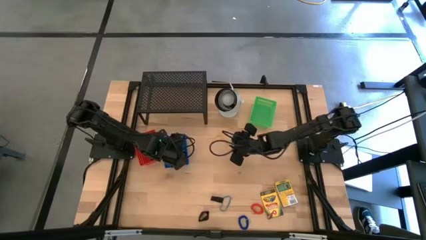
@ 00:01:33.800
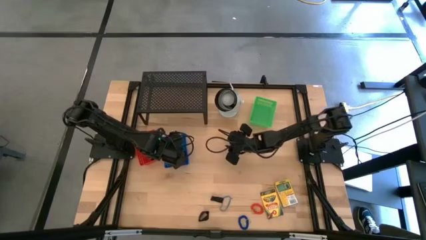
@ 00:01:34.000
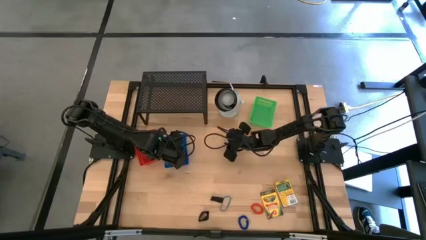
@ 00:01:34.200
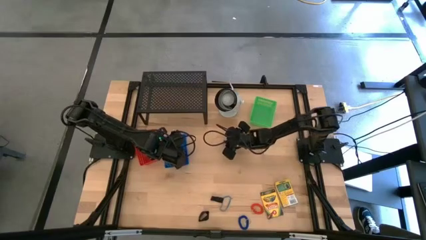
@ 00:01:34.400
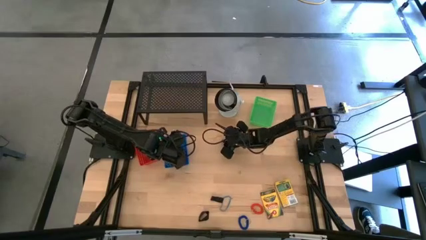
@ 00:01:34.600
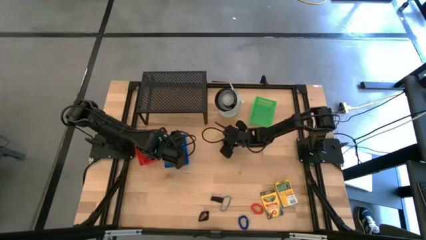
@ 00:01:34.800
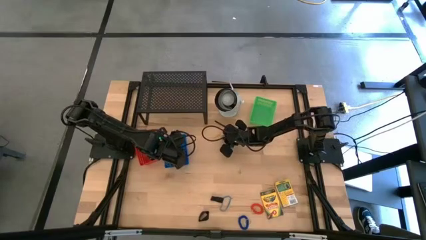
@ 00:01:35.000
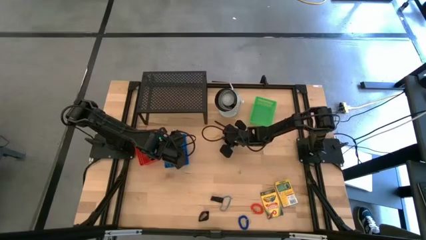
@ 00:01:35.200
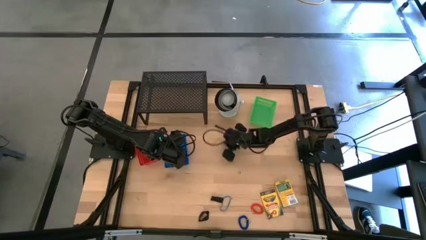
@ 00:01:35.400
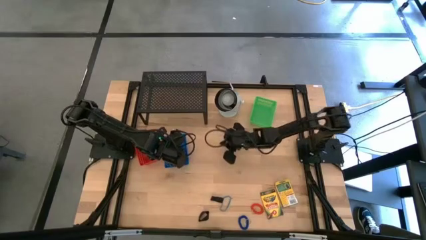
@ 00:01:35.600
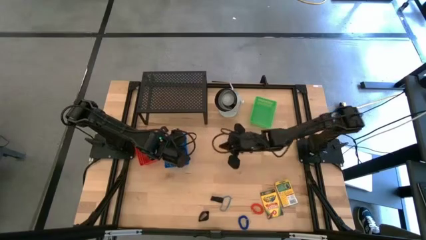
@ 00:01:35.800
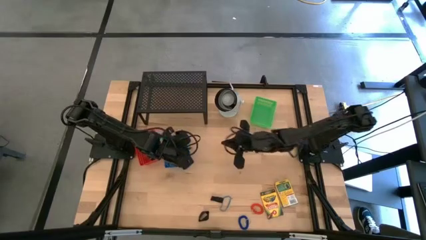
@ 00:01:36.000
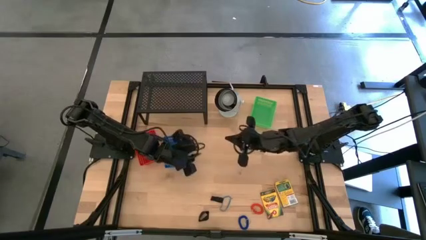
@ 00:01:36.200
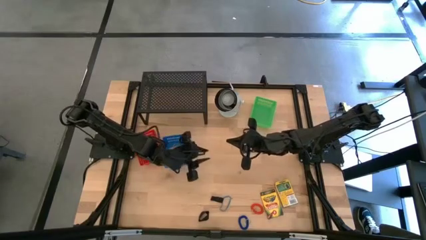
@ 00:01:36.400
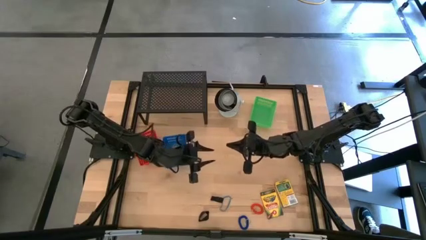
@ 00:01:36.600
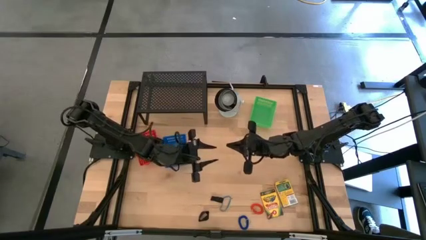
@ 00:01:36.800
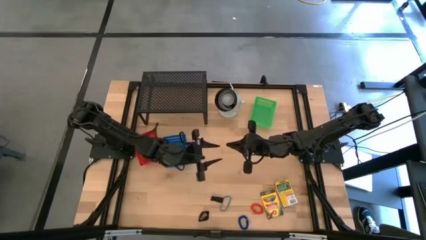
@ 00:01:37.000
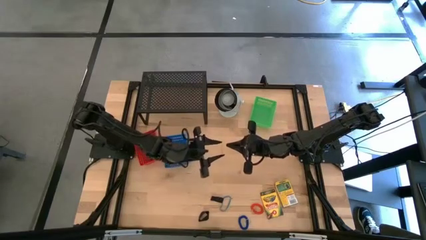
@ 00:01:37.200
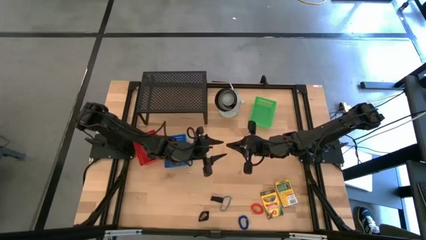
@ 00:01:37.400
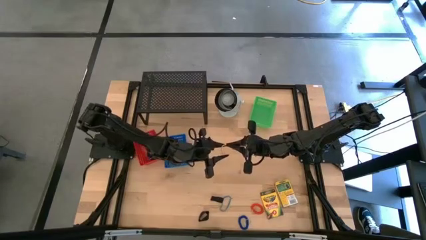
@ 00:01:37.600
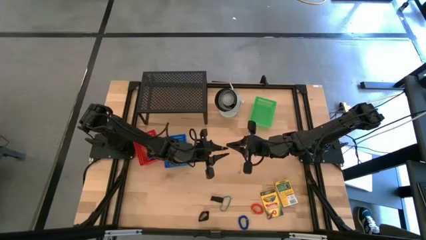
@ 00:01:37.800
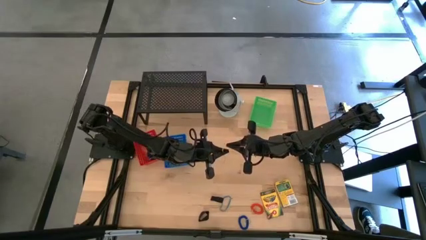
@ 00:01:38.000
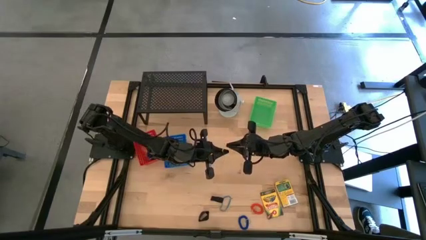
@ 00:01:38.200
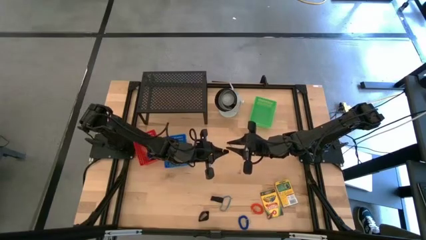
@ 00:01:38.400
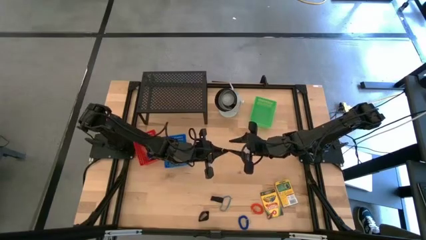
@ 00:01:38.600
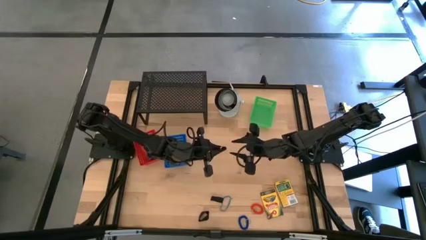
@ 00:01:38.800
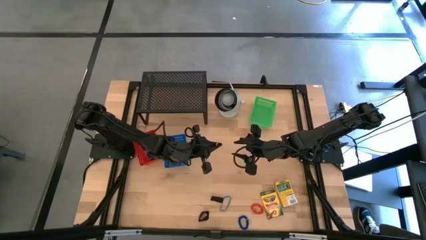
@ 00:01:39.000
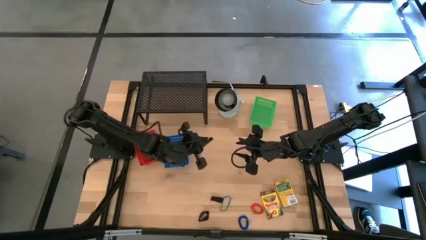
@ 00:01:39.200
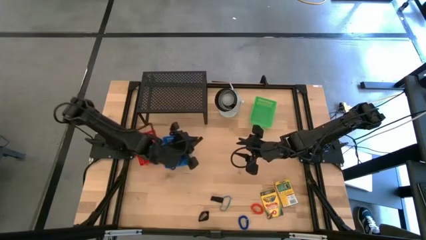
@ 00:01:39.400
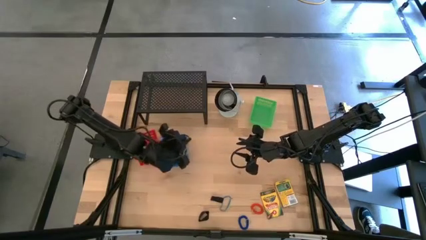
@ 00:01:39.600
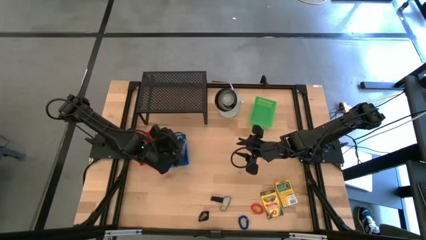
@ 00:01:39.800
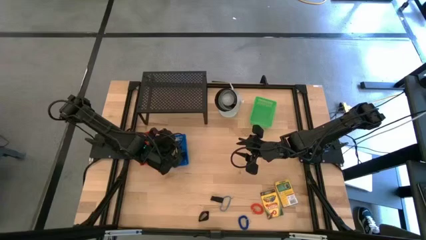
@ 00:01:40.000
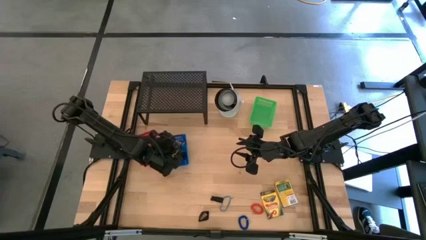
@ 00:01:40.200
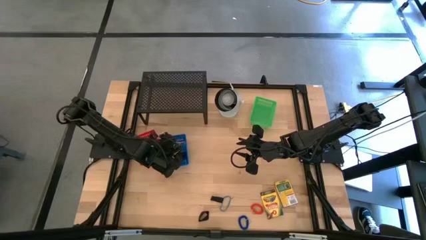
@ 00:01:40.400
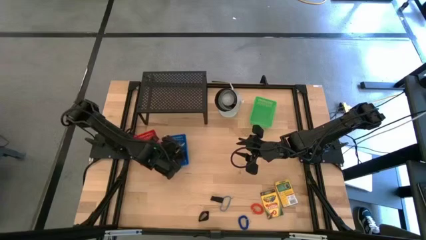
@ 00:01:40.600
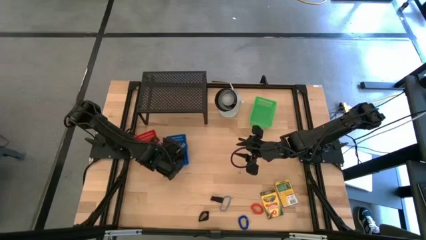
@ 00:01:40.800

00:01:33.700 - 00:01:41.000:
Task: Pick & Place Office Desk Supplies
Put the yellow rubber band into the blue bin

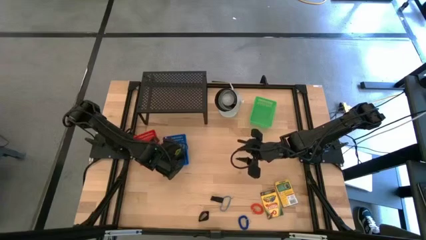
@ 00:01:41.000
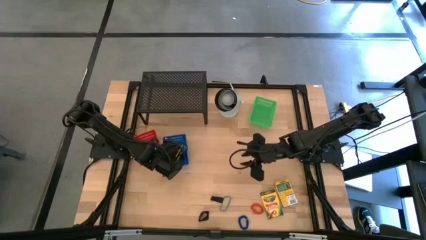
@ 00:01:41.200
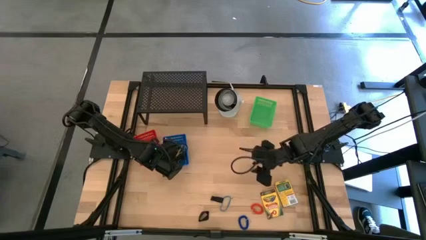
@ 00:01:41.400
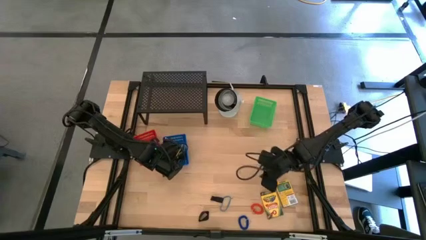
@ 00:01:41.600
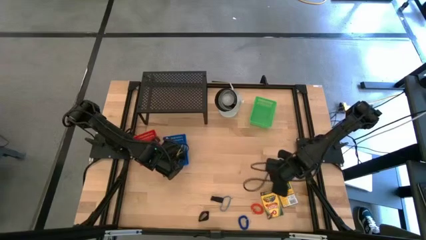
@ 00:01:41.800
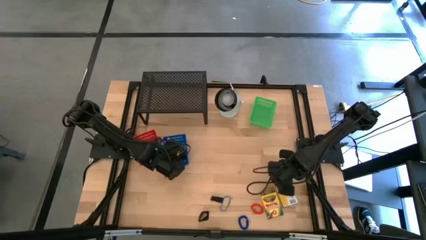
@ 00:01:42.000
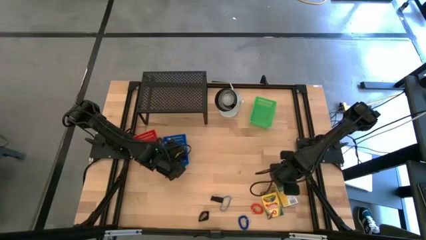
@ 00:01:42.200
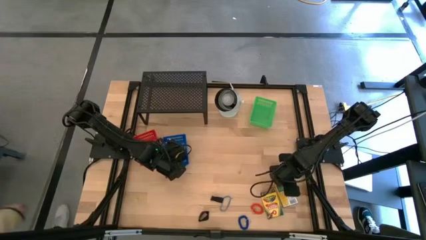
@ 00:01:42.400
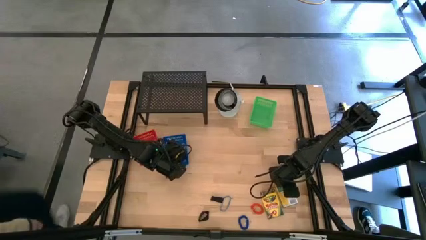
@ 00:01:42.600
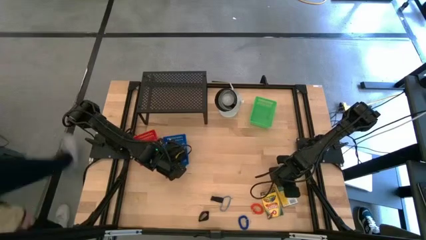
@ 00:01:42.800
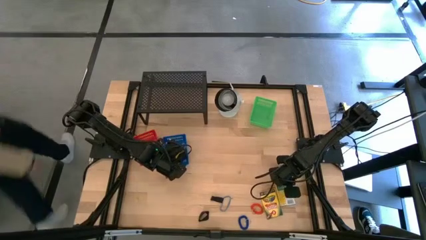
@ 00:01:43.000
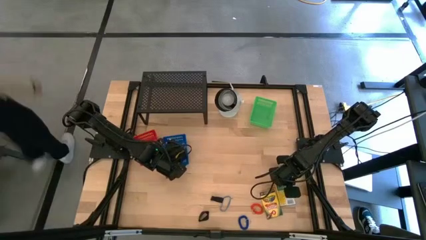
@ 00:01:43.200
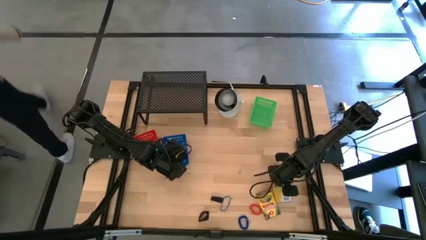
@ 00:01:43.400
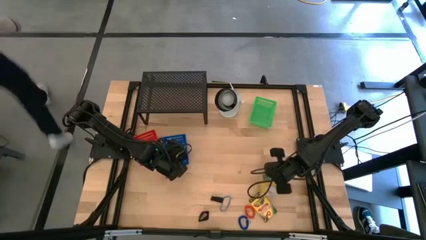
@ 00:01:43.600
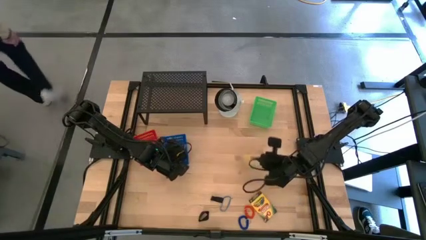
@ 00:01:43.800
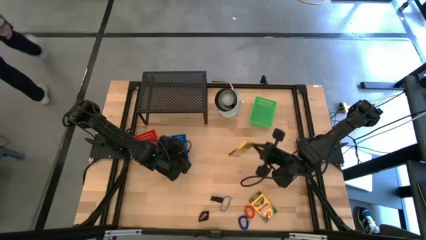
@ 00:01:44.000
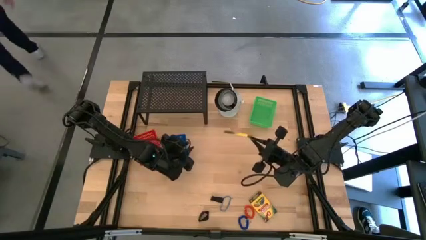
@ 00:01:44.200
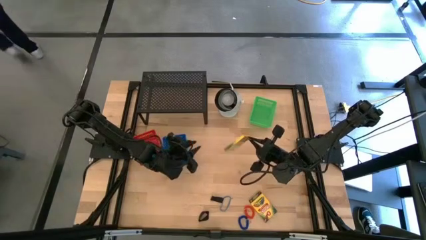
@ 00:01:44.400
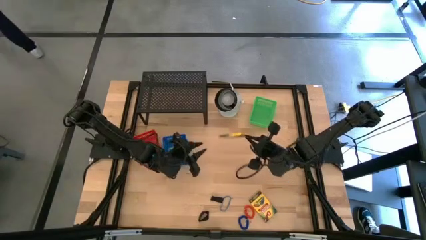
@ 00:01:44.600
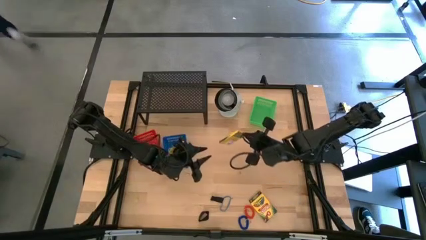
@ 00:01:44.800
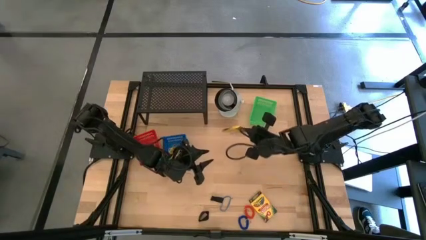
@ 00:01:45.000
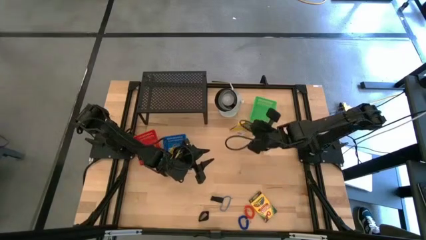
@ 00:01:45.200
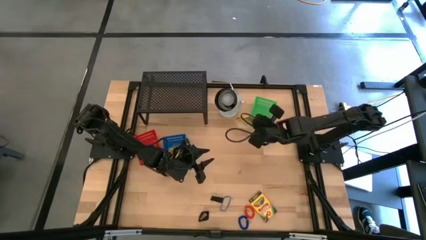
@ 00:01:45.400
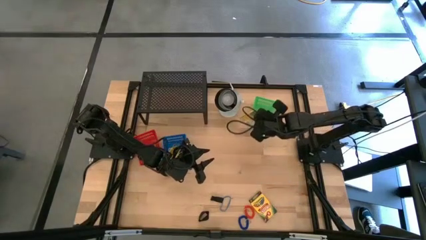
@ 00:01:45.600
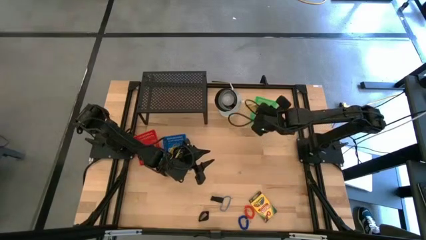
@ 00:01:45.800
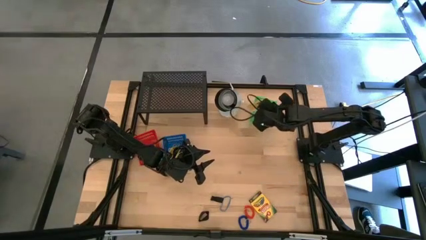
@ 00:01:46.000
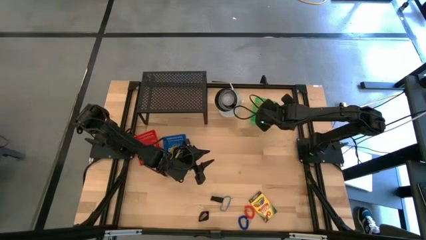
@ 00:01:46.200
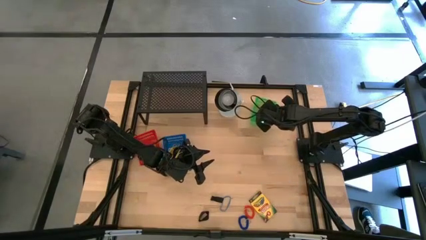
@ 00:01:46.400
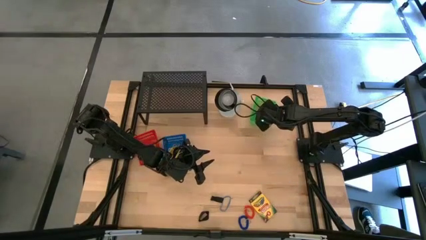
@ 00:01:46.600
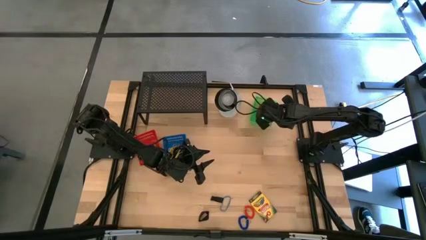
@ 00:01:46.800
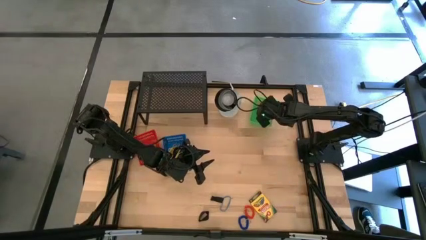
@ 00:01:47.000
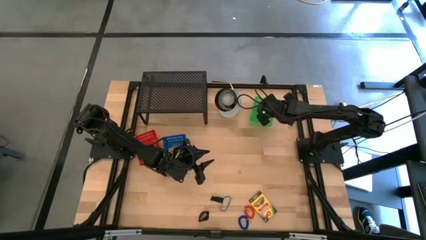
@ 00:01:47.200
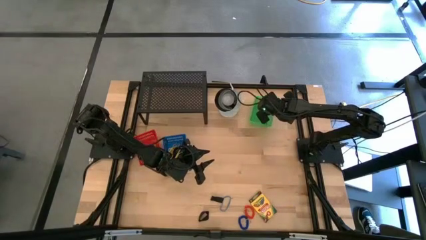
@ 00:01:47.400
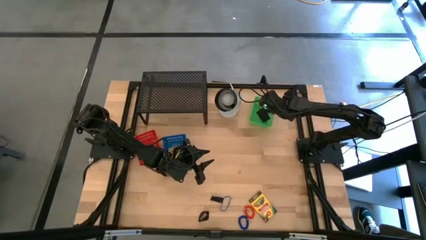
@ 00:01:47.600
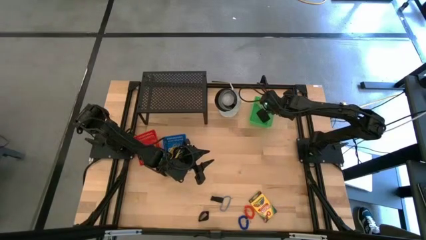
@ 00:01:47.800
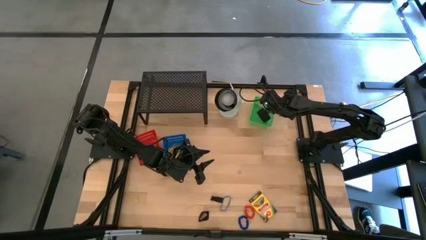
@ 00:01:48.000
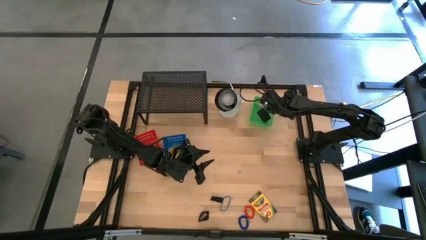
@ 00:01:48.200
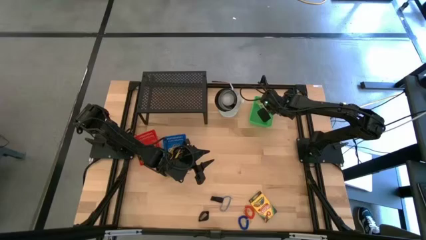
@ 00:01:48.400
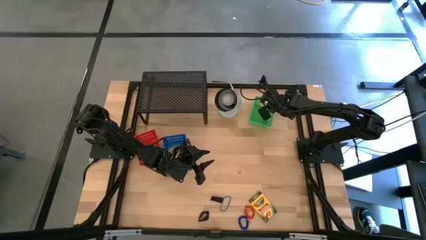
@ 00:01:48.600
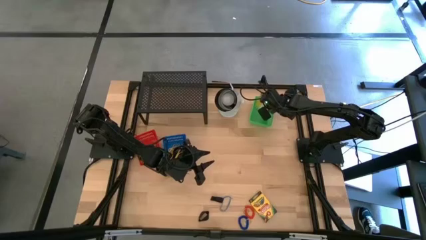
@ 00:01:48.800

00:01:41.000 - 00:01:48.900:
Put the yellow crayon box into the green bin

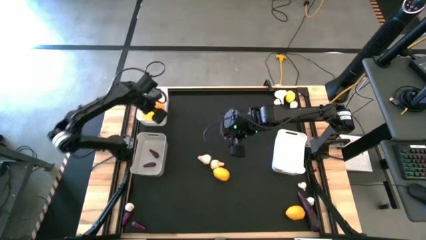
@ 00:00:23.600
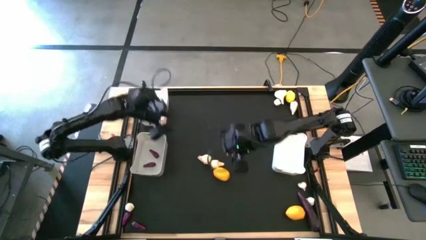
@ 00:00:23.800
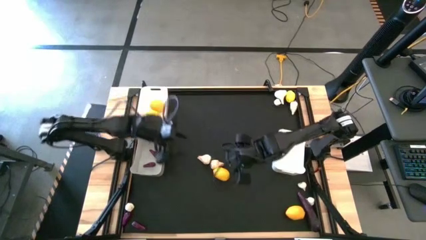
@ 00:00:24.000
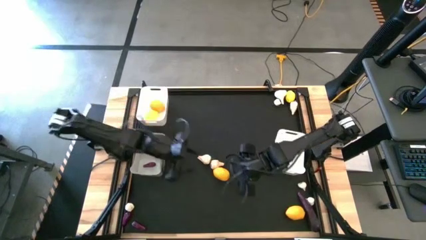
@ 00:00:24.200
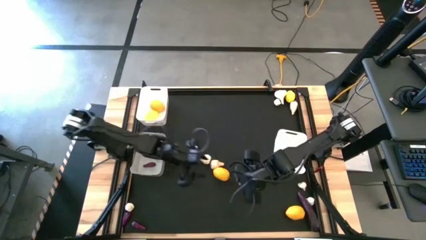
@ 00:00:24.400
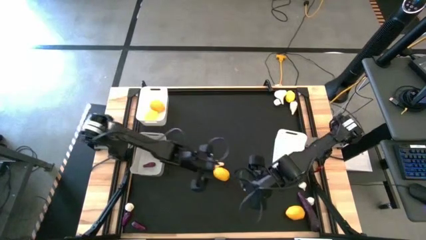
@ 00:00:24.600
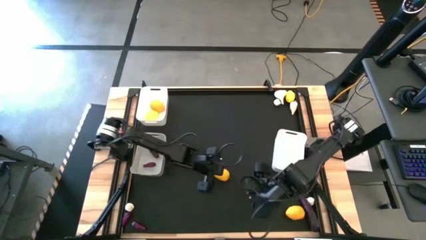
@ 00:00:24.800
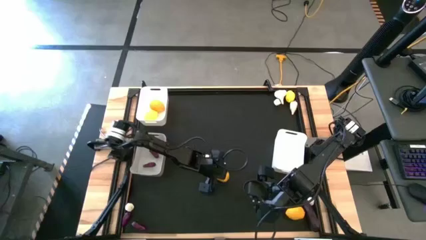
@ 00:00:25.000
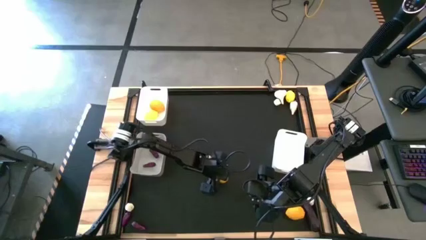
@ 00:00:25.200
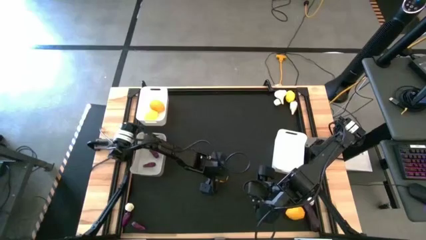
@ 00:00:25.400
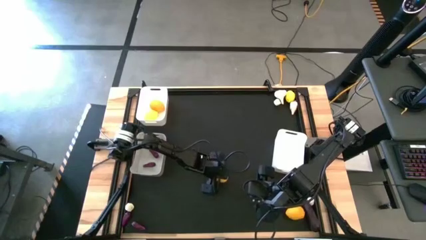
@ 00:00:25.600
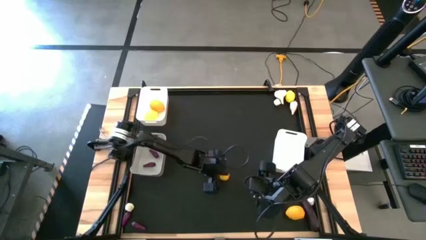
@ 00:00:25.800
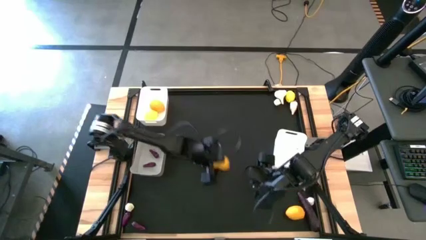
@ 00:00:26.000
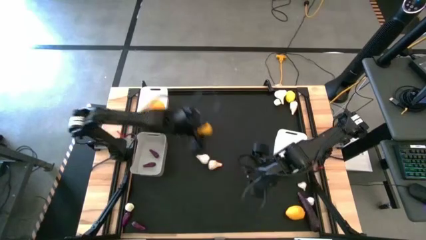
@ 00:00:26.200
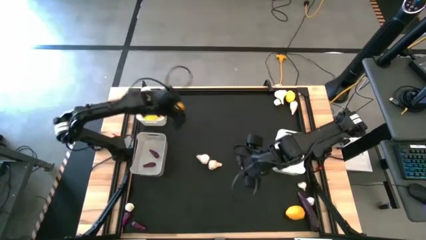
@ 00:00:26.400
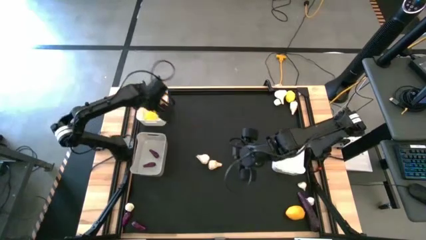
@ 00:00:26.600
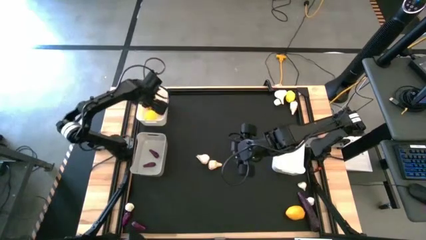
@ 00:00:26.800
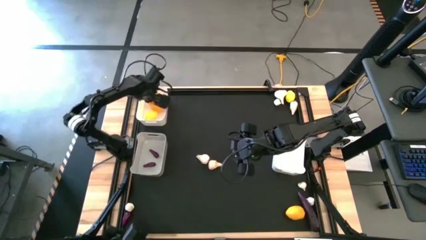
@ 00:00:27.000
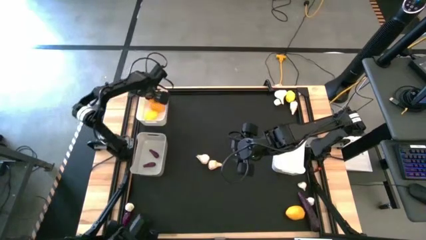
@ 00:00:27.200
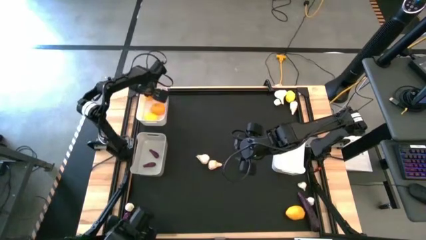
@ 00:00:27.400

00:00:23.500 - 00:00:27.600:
Task: Sort produce into baskets
Put the yellow lemon into the top white bin
